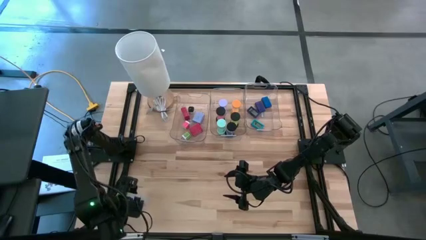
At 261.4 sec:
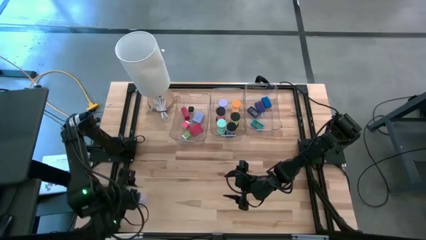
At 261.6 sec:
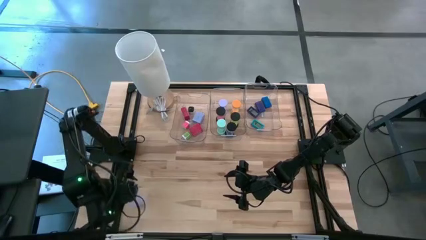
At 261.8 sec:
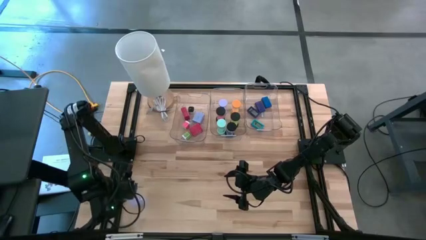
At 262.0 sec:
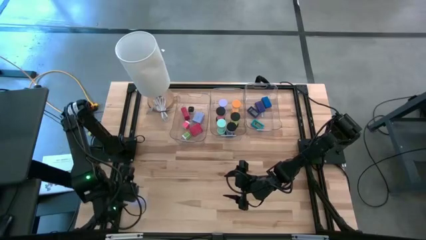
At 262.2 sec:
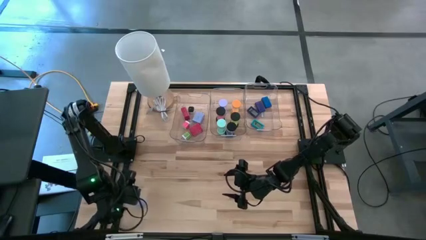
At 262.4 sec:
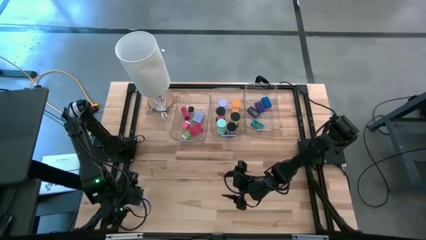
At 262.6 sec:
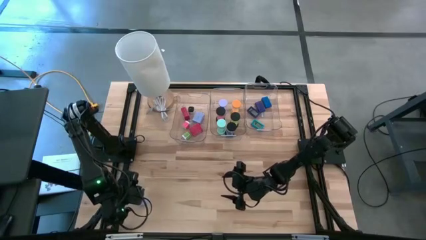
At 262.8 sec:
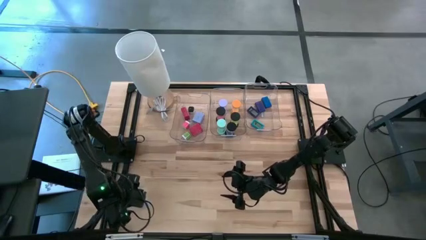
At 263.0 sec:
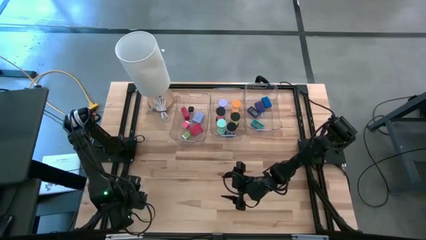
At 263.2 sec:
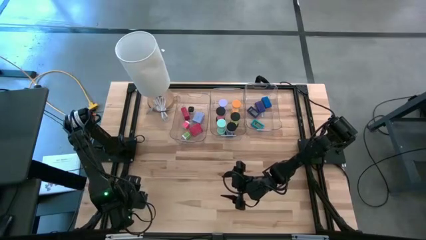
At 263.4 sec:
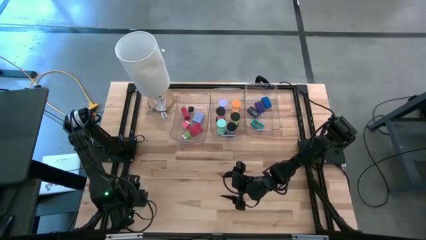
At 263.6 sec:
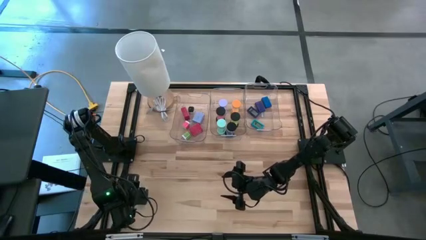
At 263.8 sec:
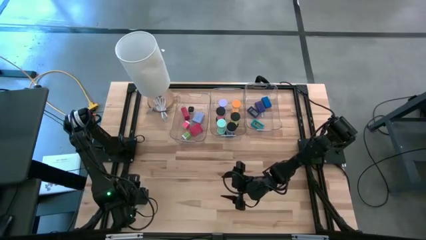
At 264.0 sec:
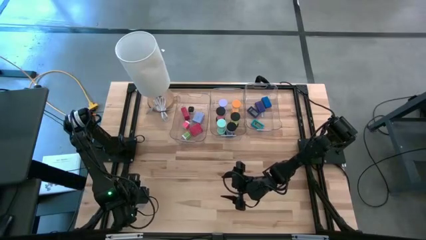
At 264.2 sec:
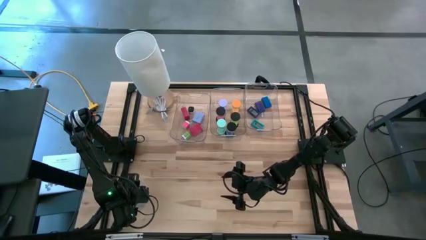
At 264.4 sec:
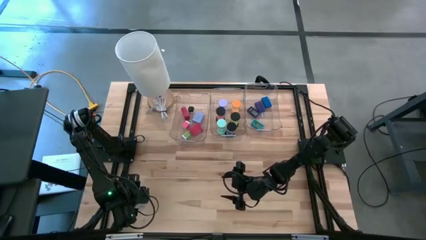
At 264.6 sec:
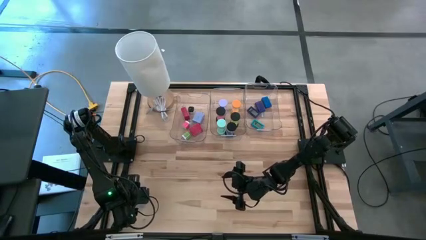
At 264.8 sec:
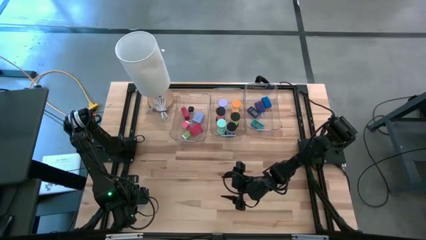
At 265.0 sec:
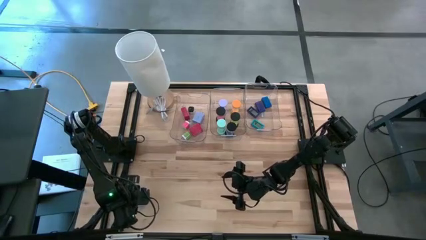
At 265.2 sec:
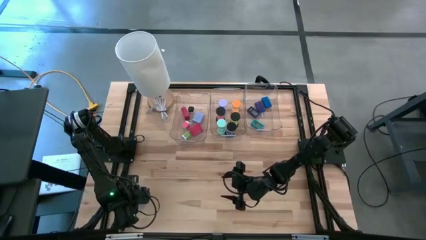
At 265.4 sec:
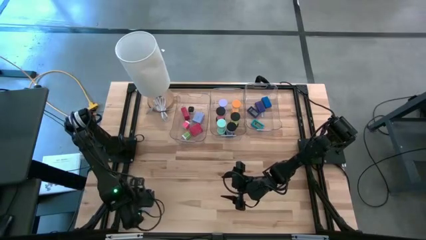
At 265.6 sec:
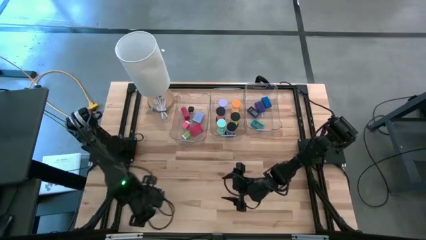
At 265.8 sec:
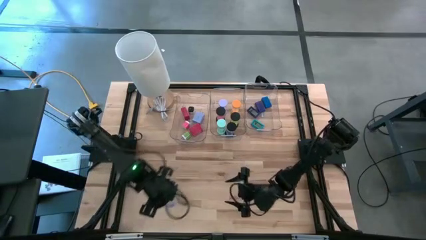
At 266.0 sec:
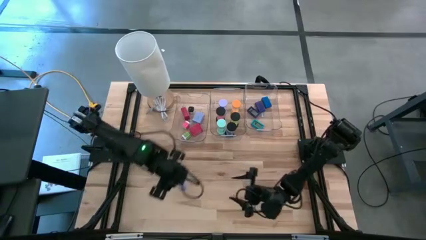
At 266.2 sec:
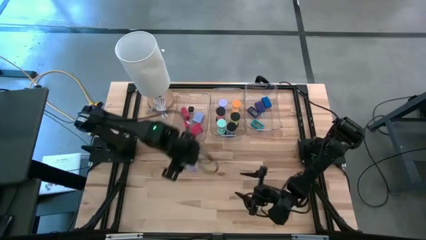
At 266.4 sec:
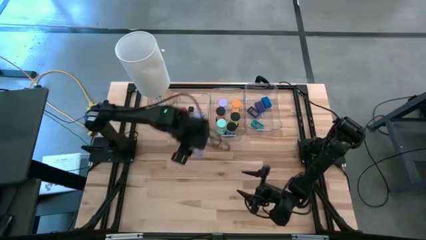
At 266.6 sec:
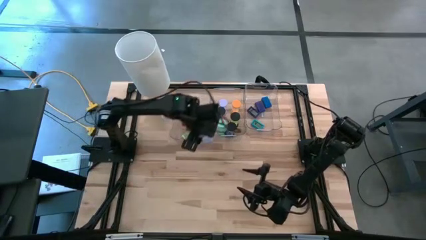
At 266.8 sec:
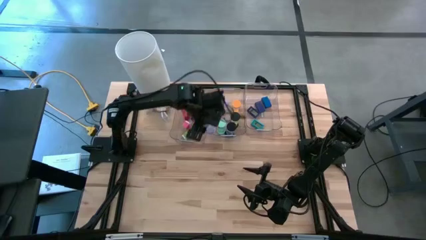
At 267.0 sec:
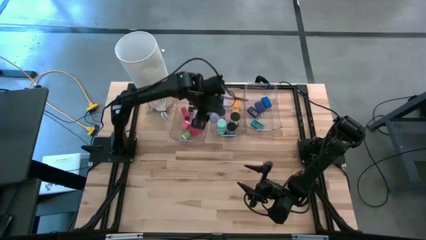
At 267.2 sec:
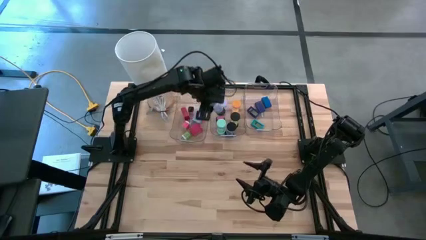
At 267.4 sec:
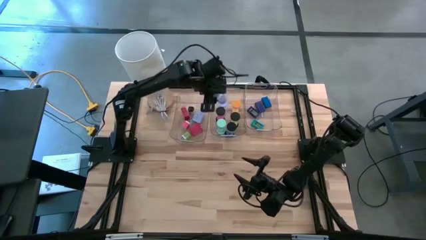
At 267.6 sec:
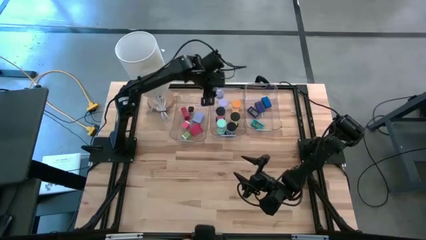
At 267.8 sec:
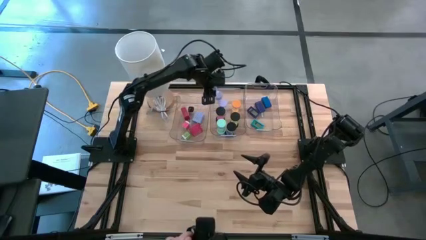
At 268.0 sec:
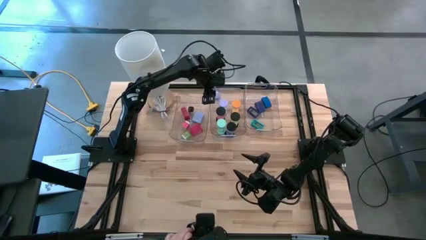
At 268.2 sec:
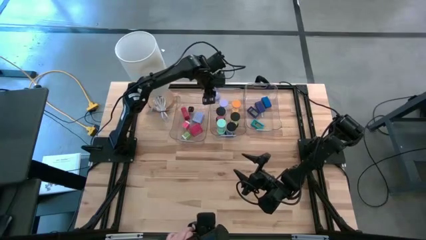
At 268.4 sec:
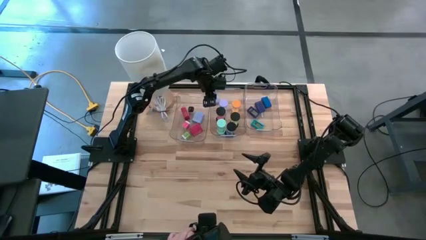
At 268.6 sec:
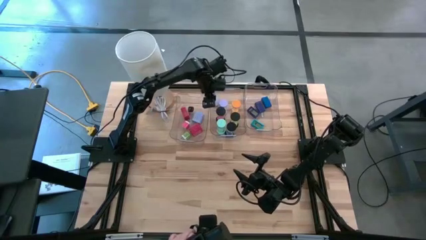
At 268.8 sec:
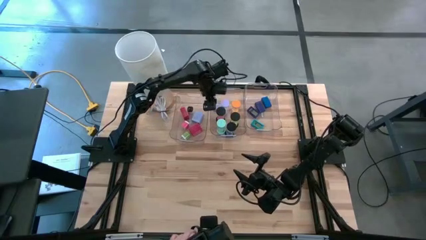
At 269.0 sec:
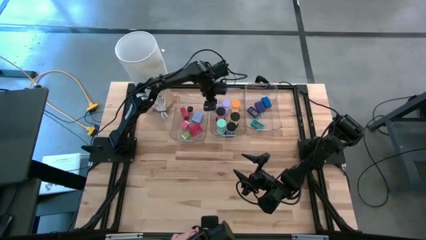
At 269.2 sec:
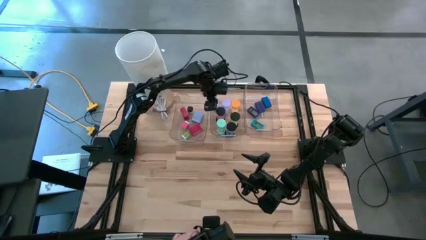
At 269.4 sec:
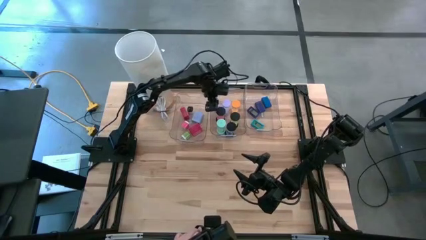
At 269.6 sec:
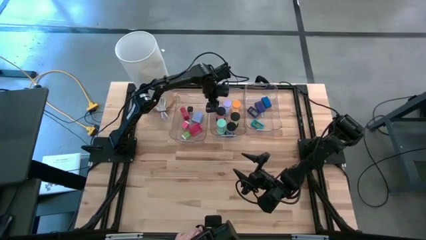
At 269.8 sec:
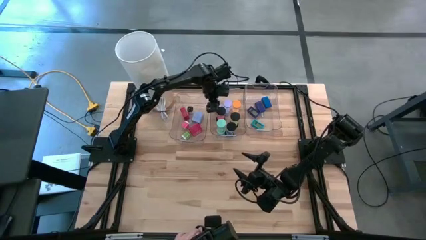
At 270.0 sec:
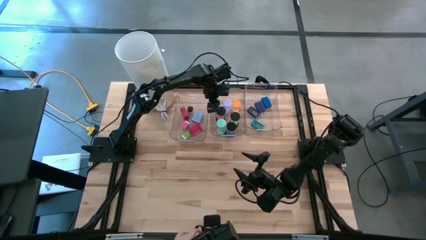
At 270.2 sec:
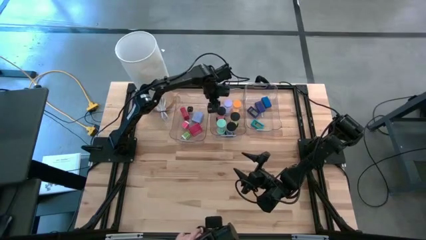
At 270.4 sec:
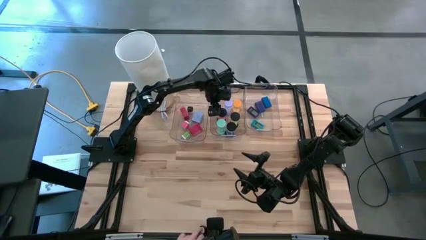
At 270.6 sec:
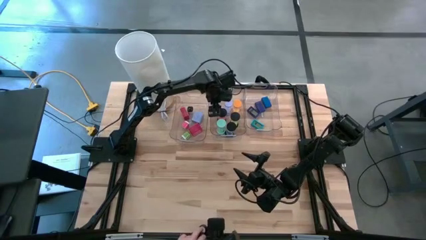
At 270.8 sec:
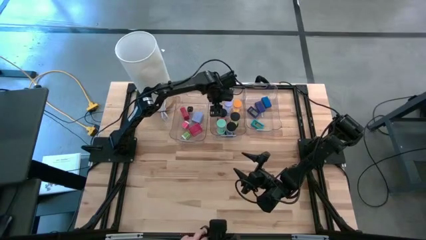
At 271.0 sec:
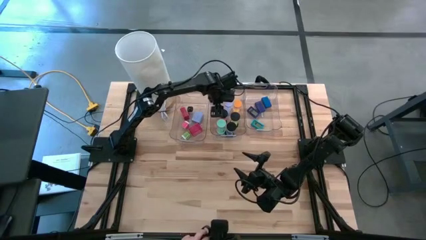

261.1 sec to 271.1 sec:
Task: Pick & Place Office items
Put the violet hourglass into the middle transparent bin

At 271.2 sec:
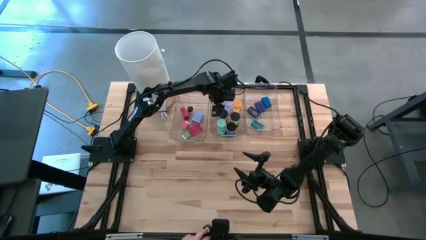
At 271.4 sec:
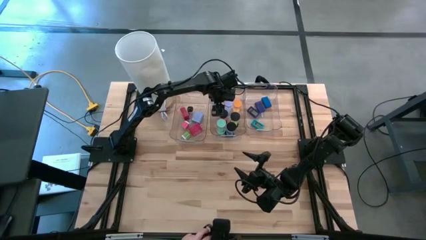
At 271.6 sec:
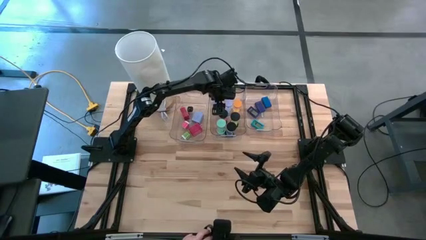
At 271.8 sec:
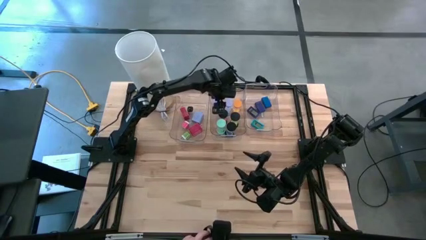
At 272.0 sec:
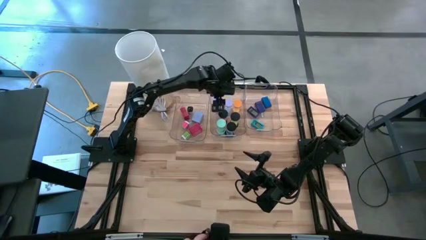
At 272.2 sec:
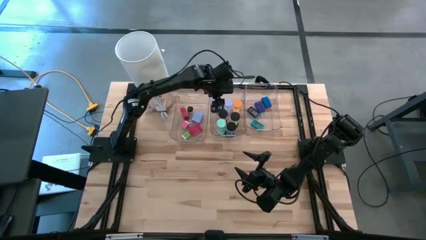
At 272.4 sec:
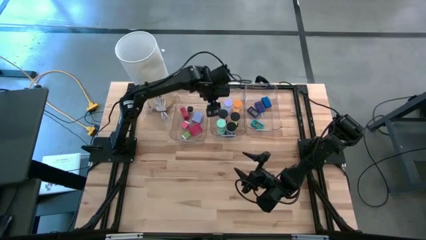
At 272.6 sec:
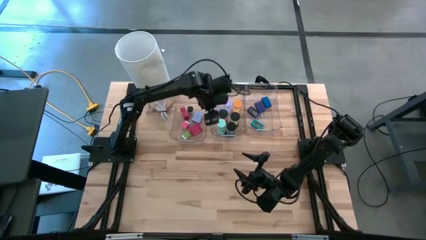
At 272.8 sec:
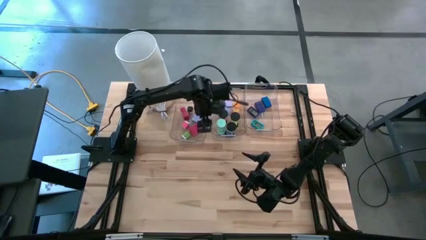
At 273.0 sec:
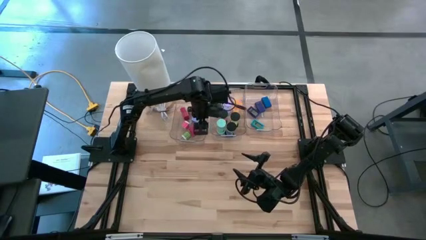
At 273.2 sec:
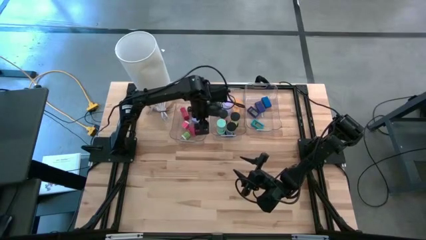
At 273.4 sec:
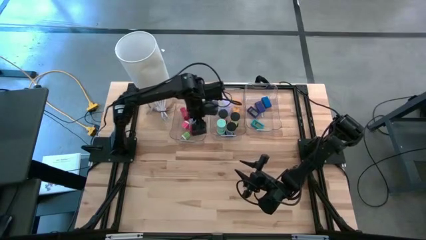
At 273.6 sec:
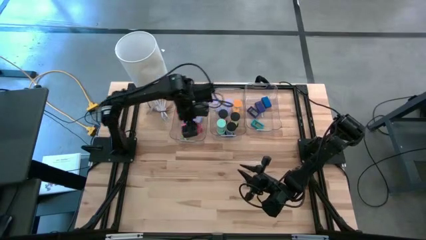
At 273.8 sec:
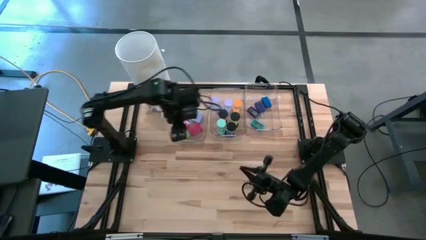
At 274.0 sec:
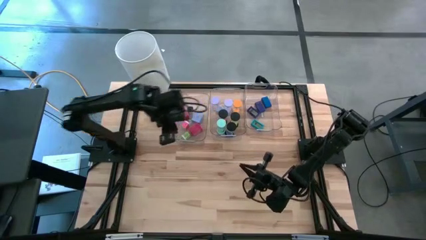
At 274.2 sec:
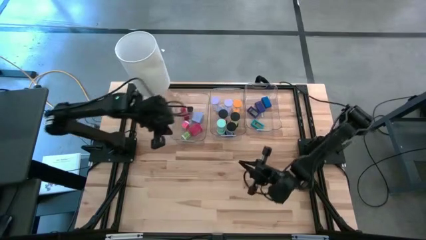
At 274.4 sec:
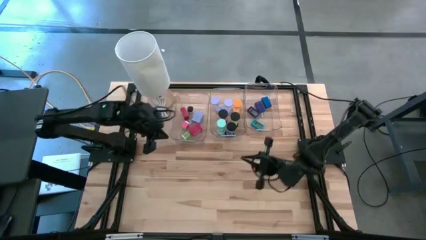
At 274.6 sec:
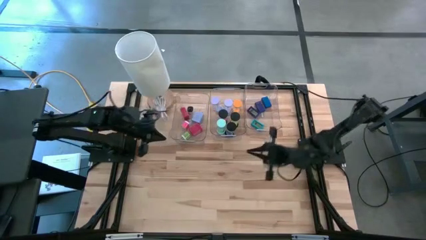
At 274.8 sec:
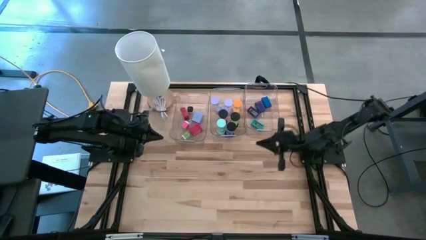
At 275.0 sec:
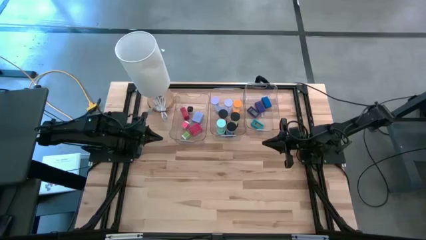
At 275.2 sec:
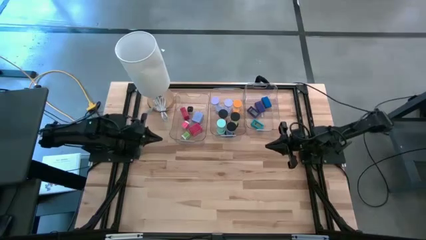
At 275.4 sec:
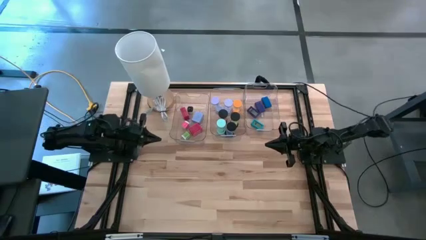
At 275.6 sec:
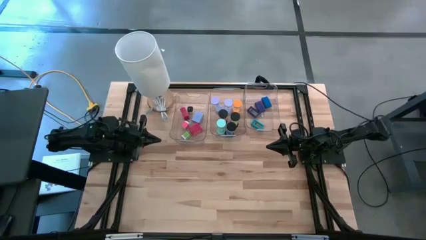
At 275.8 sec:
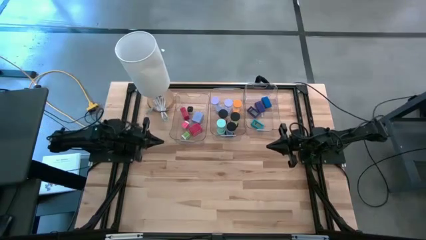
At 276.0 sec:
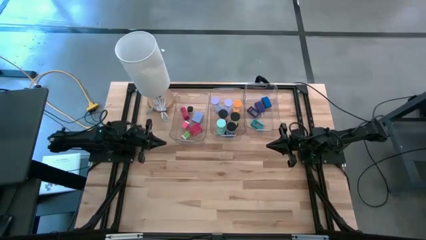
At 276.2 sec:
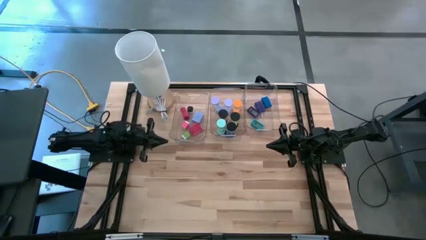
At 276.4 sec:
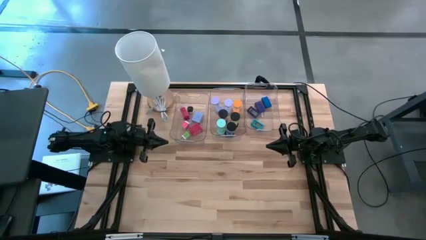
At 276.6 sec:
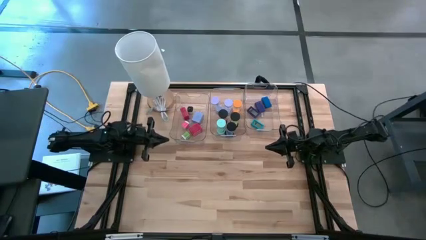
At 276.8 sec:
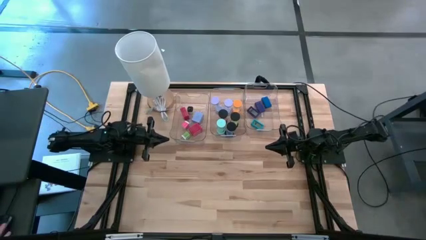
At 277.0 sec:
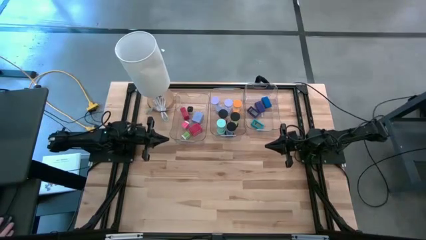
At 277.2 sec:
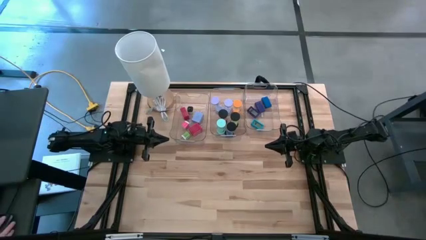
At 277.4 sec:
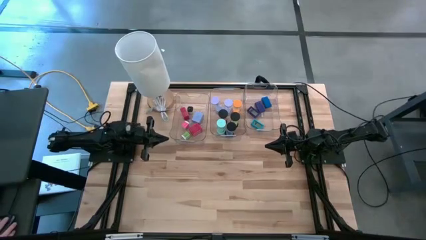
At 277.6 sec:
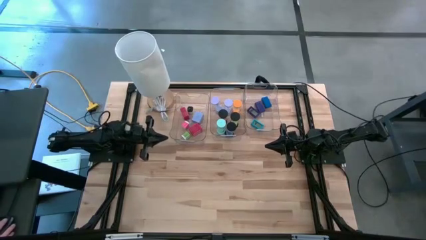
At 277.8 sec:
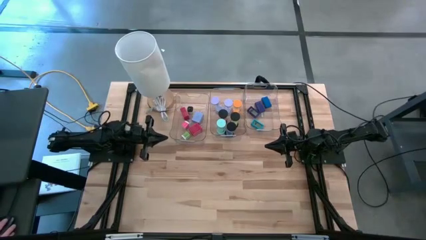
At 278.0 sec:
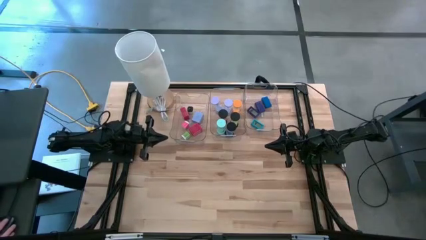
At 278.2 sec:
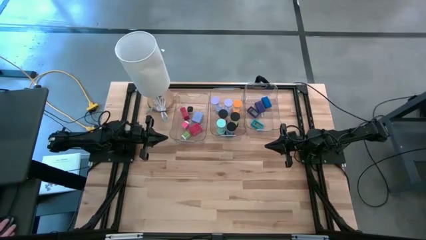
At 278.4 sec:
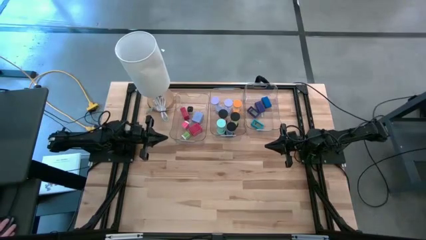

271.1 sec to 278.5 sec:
Return to Home Position
